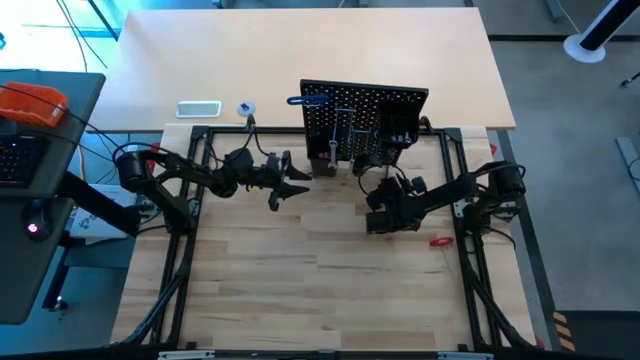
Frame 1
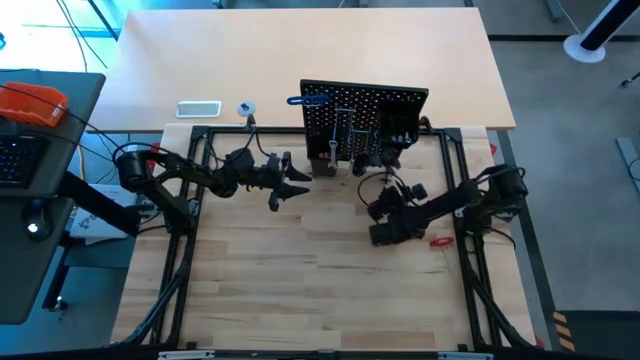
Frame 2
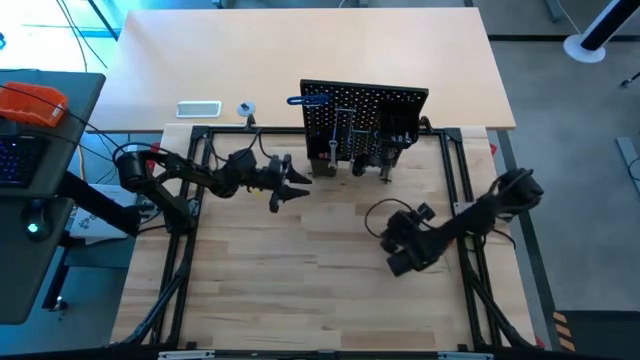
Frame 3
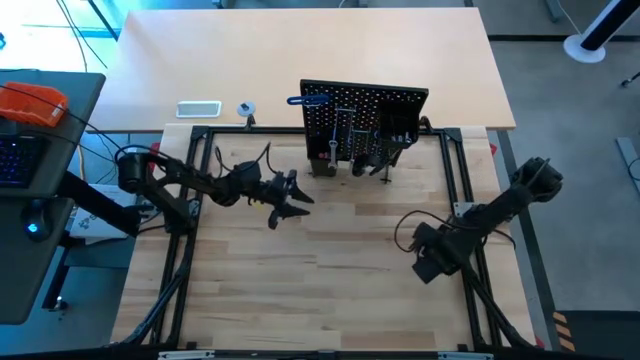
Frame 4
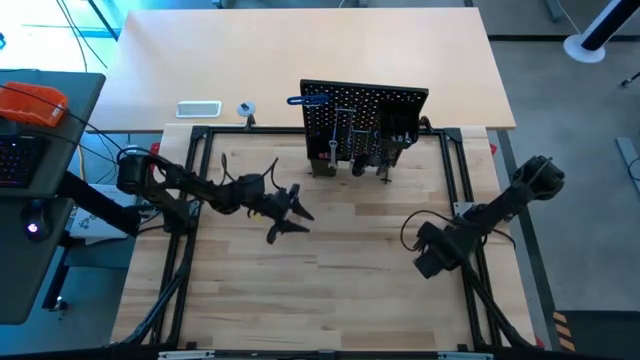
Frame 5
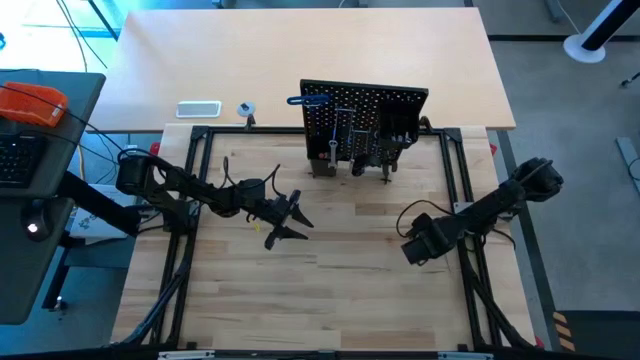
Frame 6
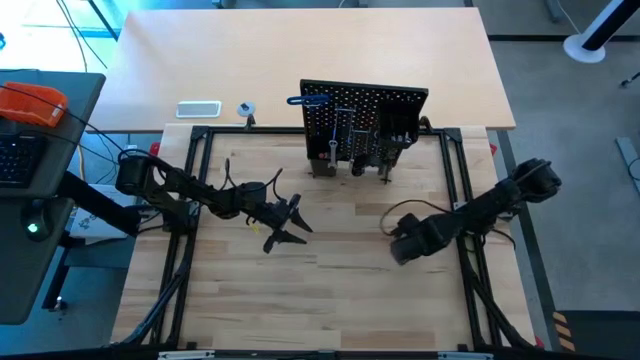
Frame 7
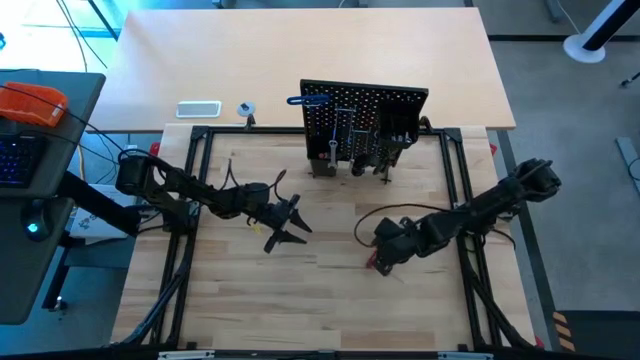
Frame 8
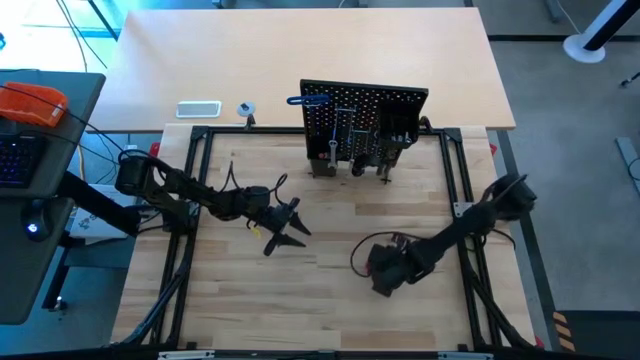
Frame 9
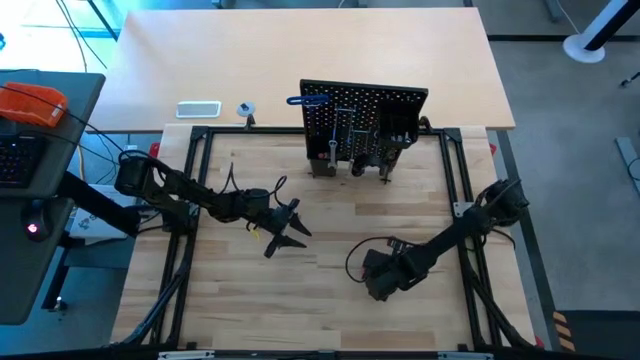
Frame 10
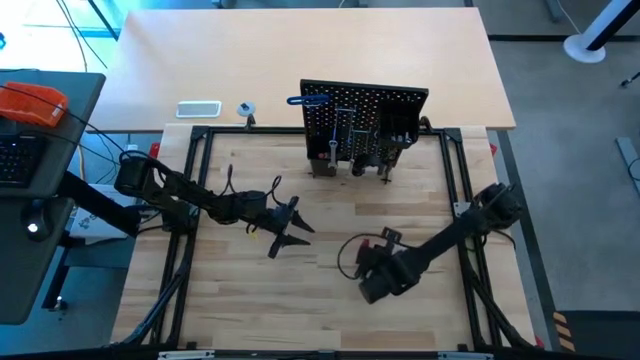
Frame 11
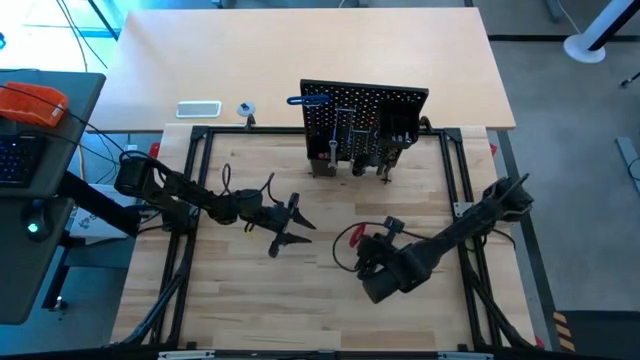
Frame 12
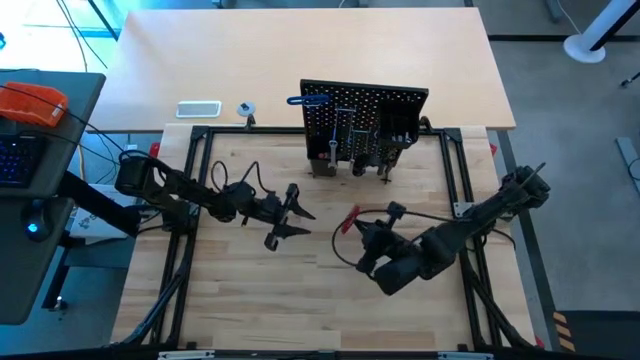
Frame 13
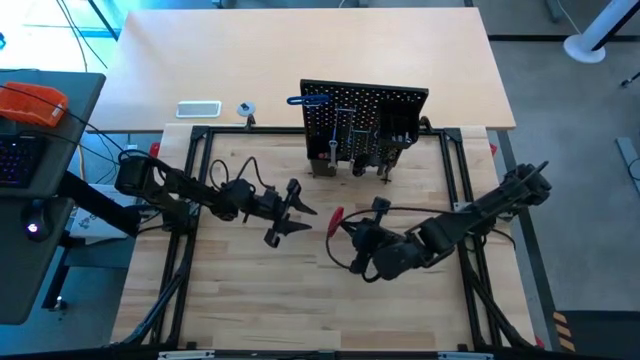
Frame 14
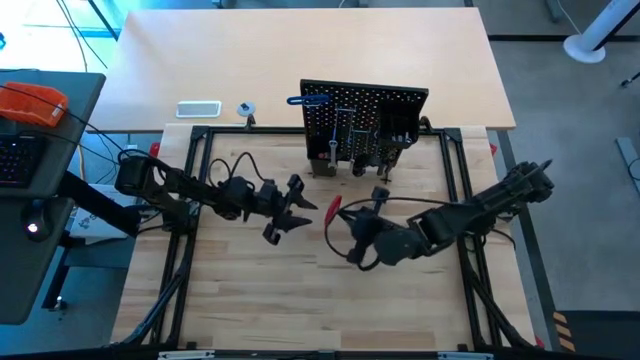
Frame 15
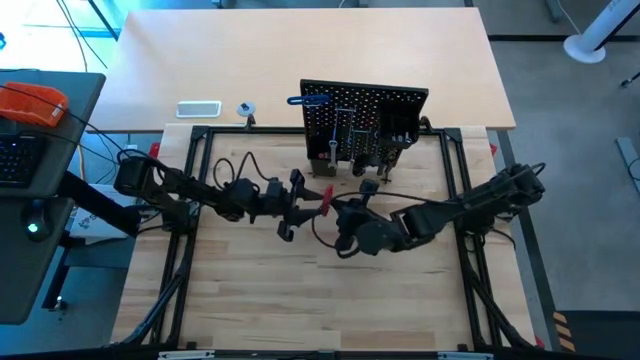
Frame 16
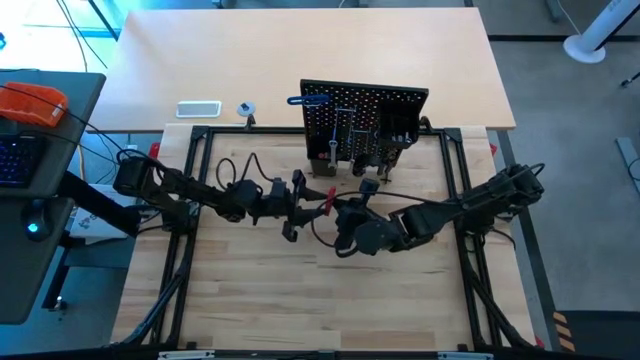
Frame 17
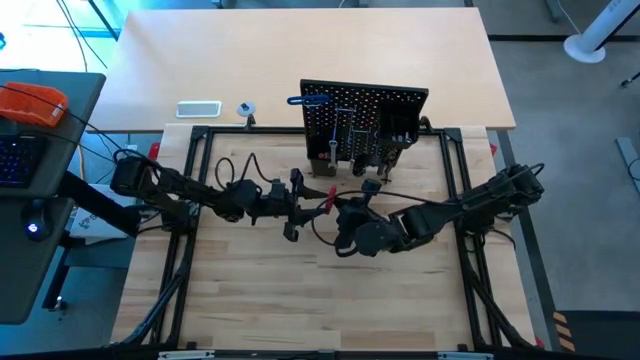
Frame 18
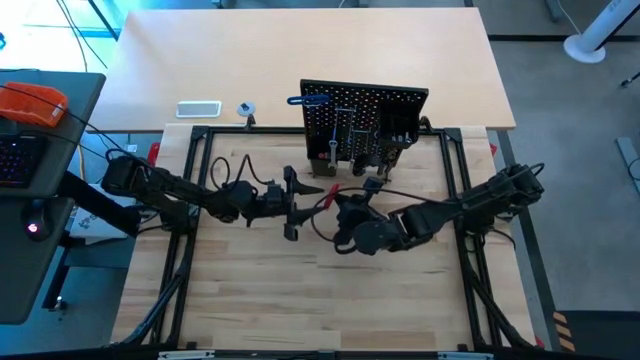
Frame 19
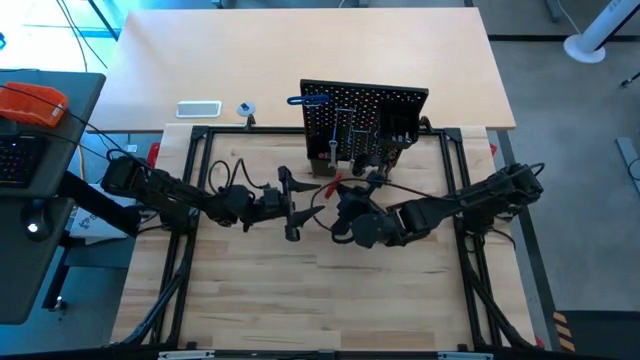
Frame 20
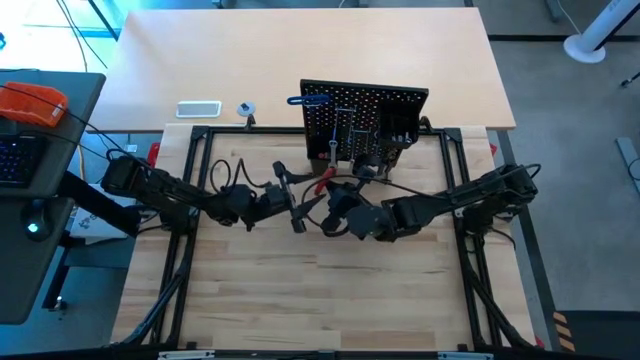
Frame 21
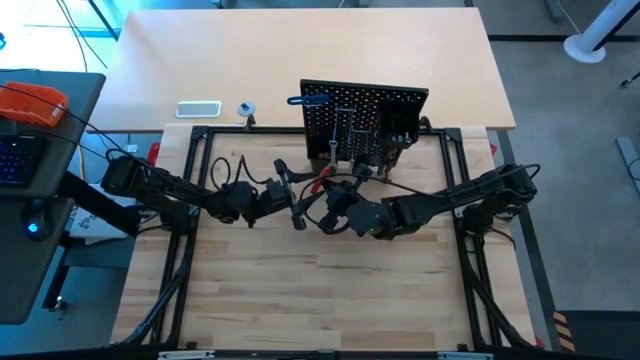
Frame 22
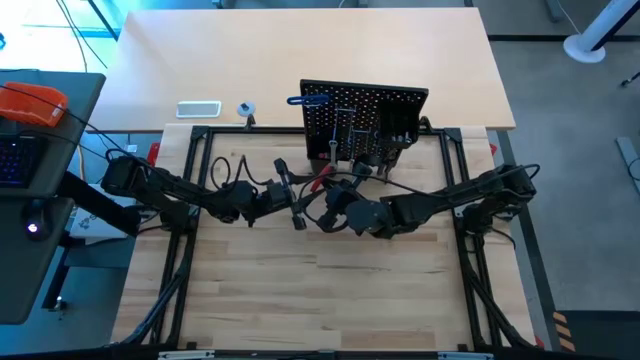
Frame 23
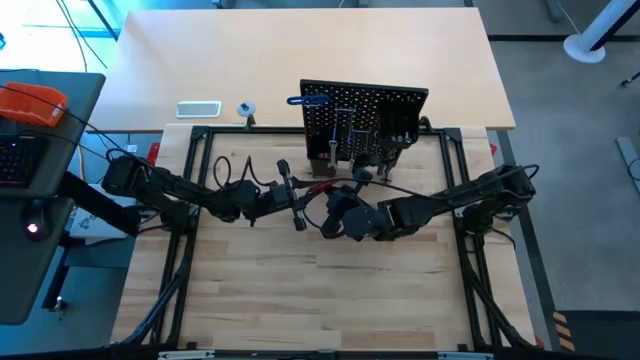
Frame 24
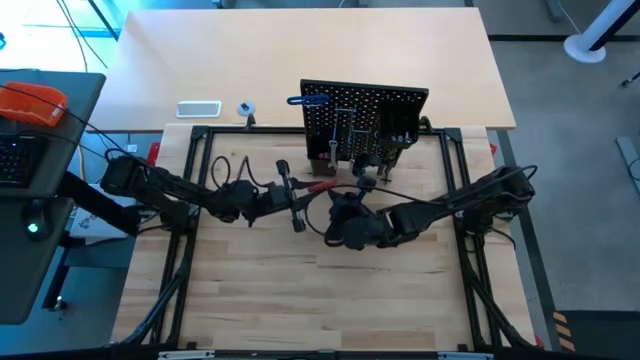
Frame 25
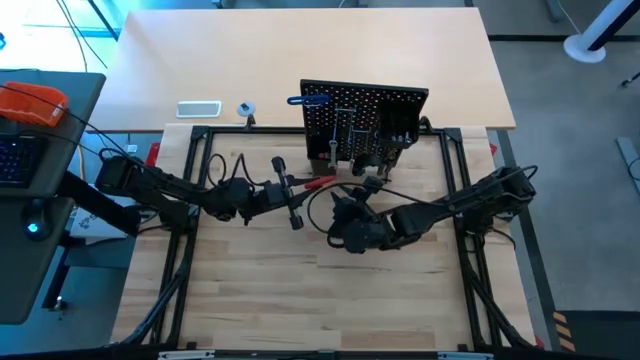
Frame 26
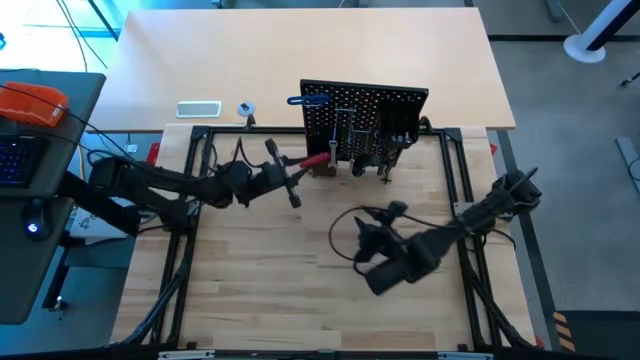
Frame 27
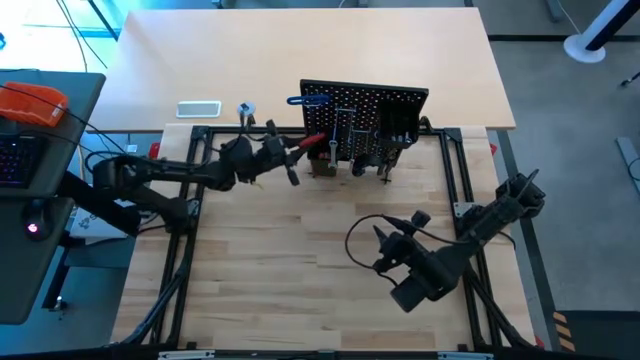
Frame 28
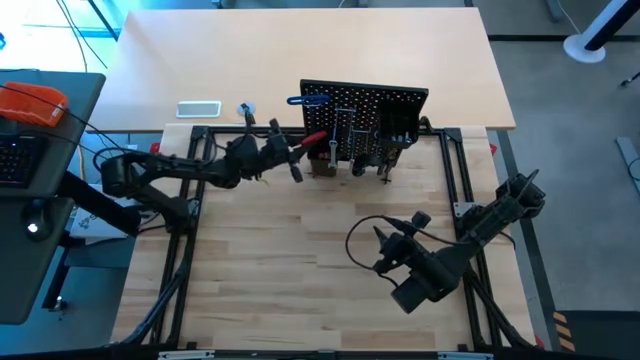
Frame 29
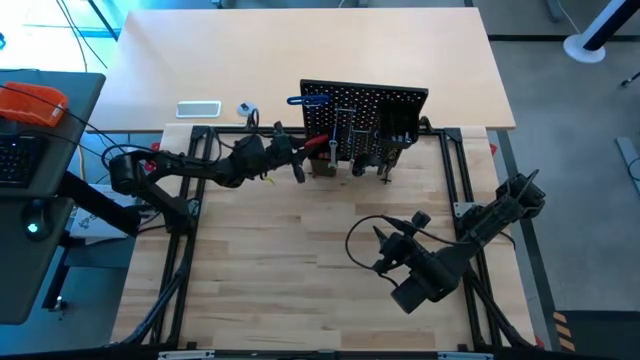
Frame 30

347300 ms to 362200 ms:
Task: Hang tools onto peg board
Put the T-handle wrench on the pegboard

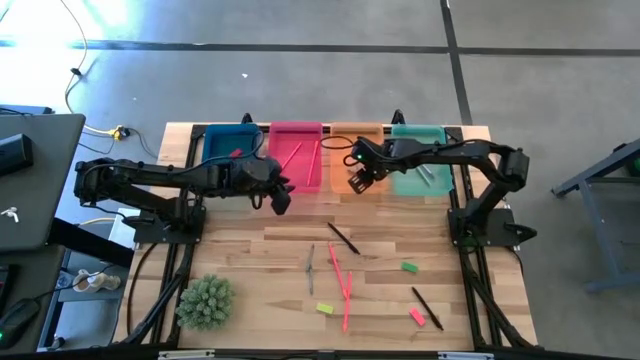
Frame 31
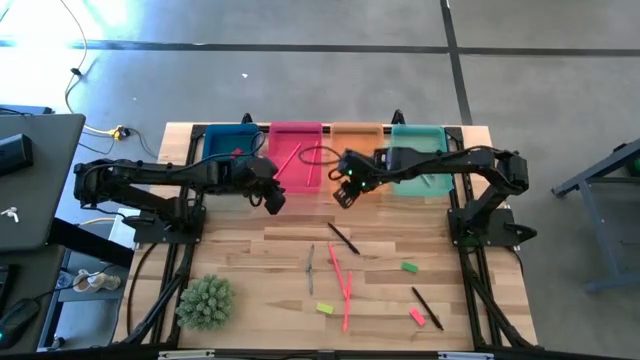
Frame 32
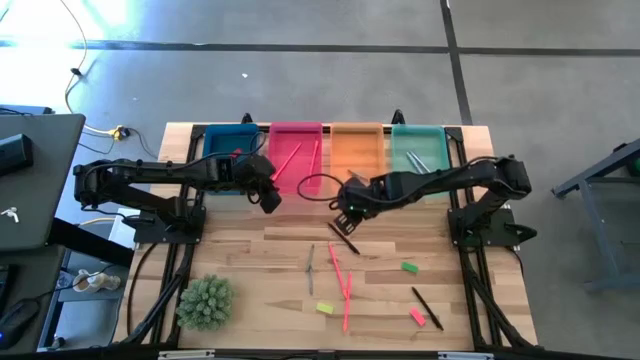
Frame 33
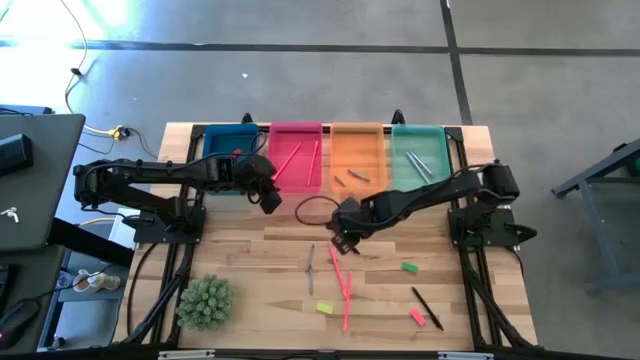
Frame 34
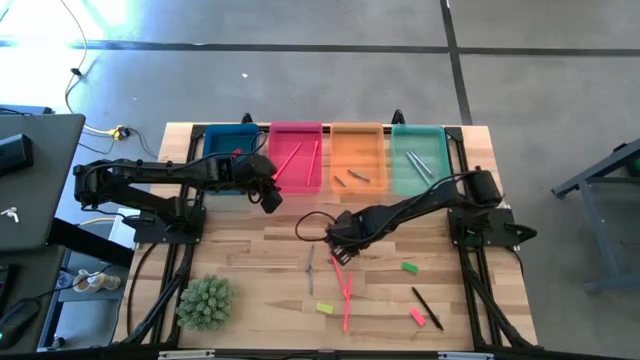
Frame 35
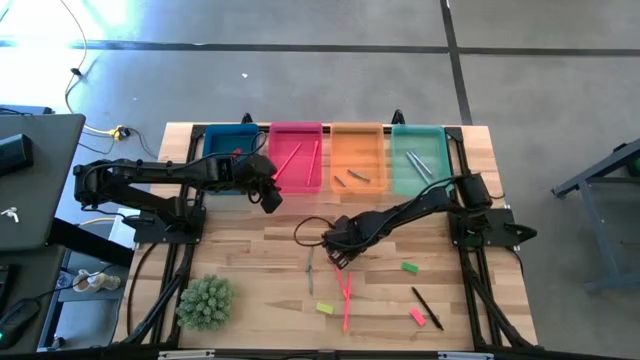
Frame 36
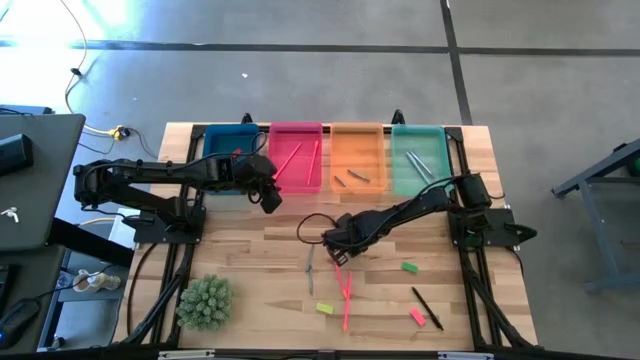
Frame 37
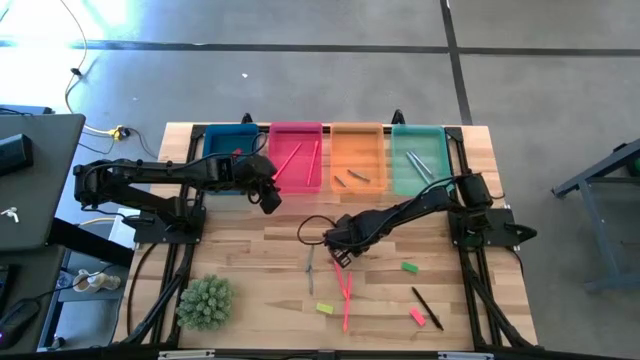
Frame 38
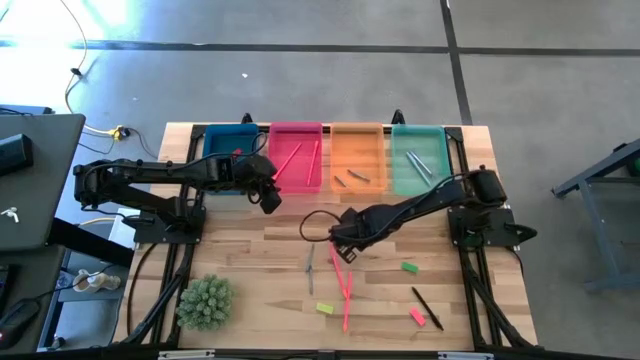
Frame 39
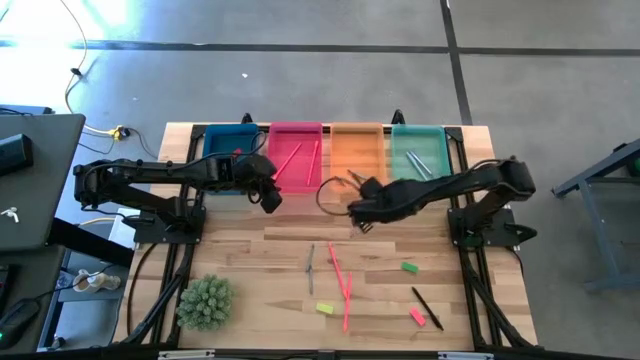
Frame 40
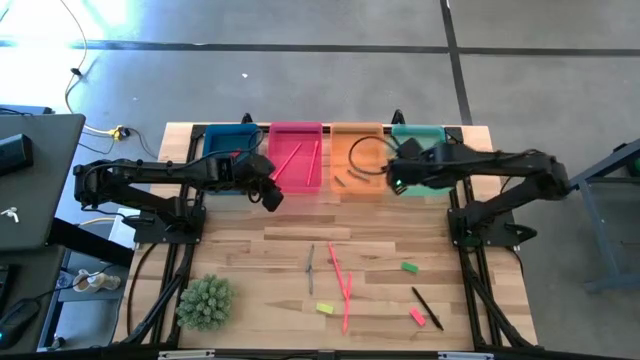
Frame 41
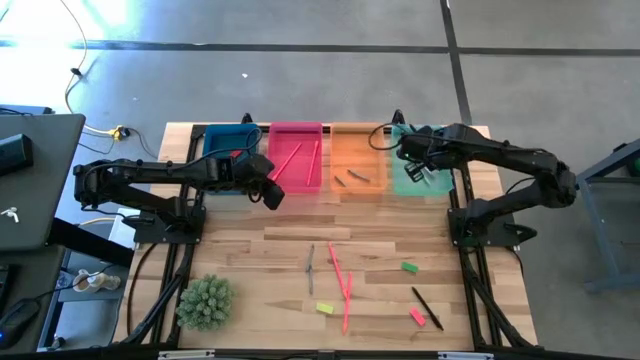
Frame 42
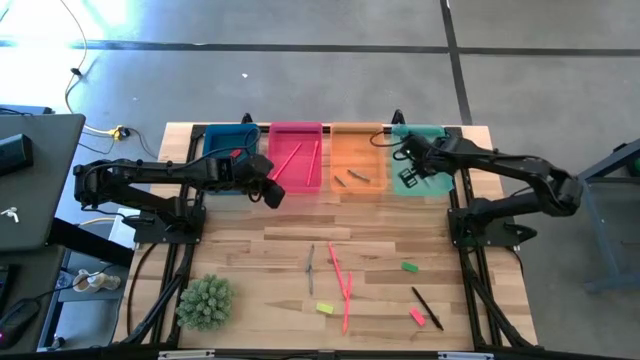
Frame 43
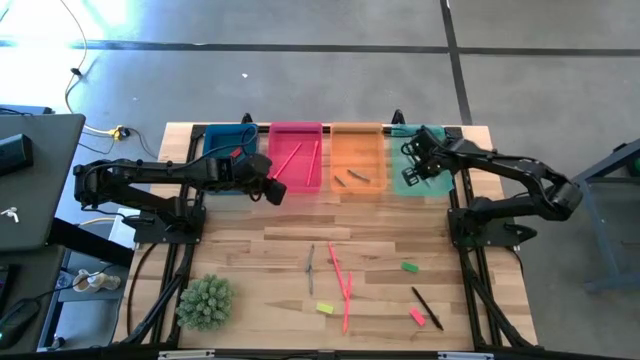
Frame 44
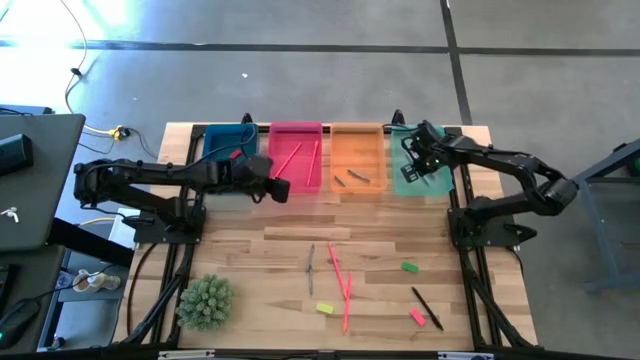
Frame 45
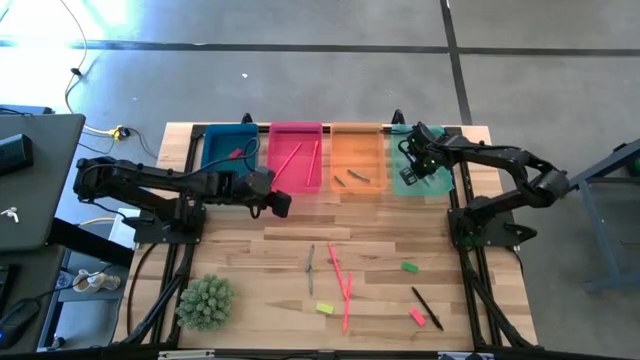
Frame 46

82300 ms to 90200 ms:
Task: Sort crayons/erasers/pens/pencils in bins
Put the black pen into the green bin
